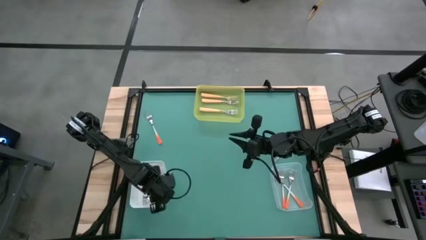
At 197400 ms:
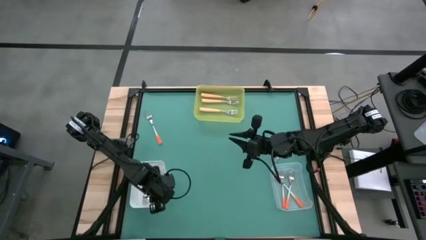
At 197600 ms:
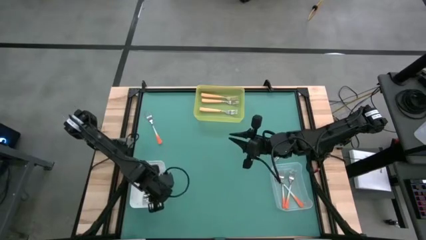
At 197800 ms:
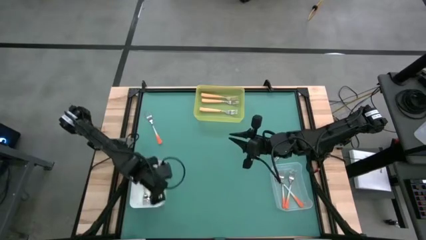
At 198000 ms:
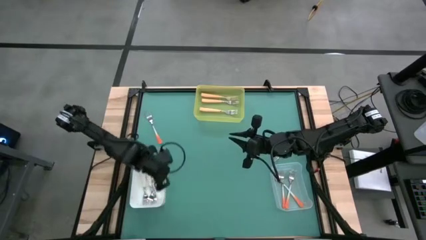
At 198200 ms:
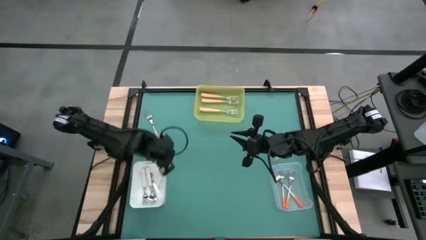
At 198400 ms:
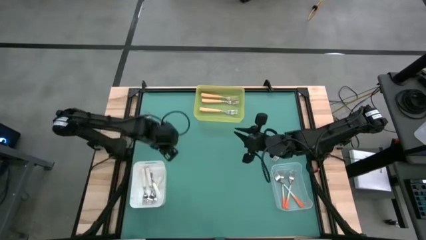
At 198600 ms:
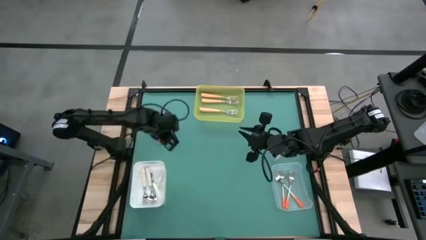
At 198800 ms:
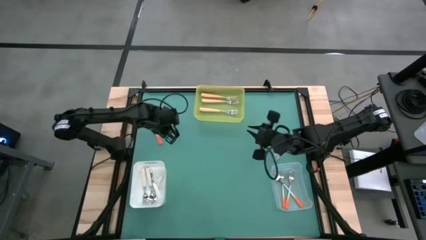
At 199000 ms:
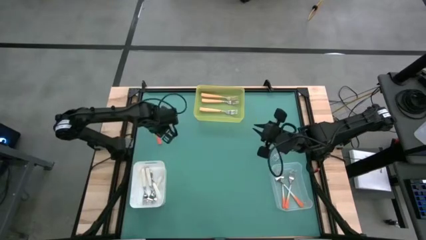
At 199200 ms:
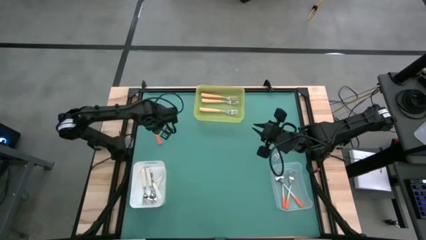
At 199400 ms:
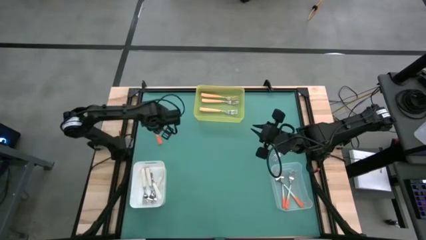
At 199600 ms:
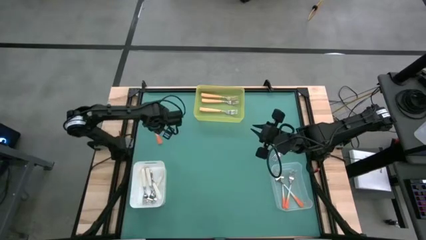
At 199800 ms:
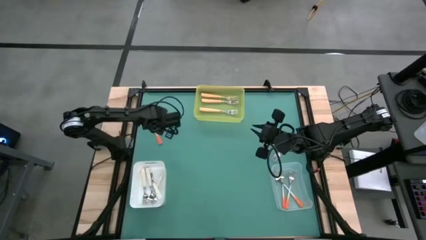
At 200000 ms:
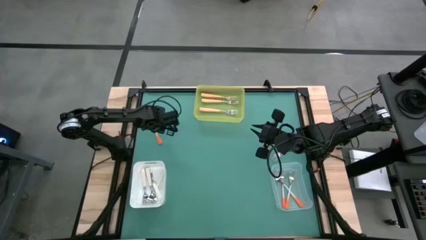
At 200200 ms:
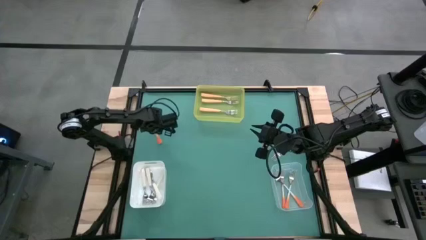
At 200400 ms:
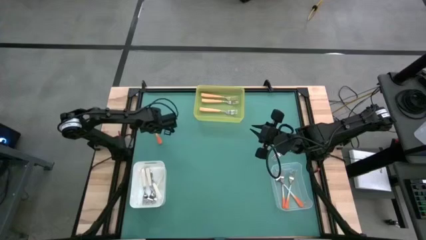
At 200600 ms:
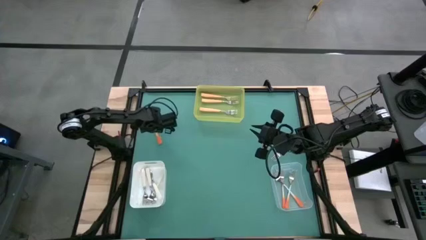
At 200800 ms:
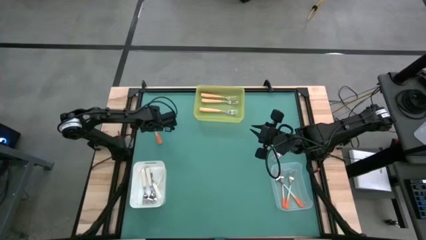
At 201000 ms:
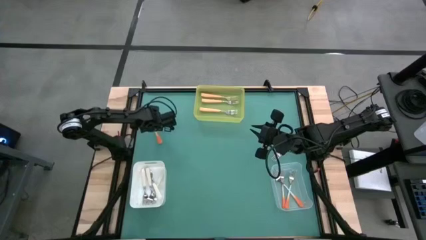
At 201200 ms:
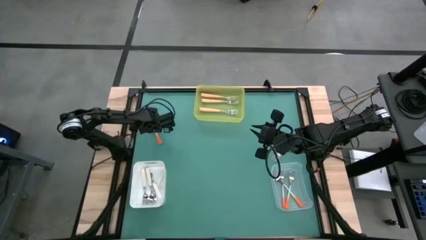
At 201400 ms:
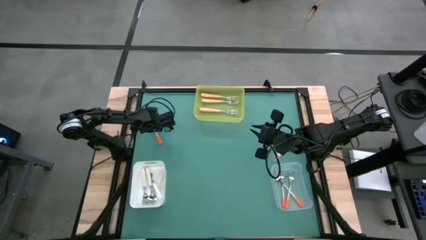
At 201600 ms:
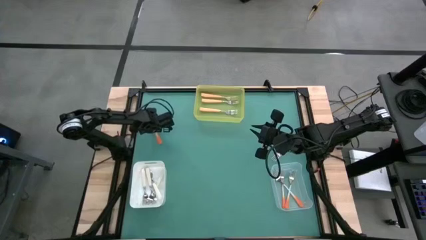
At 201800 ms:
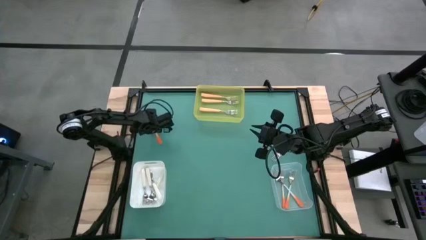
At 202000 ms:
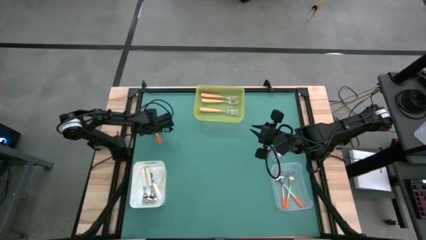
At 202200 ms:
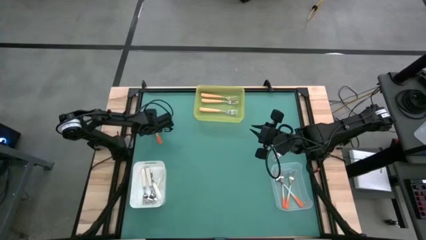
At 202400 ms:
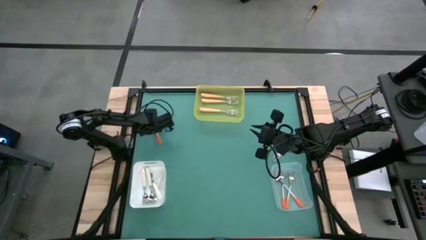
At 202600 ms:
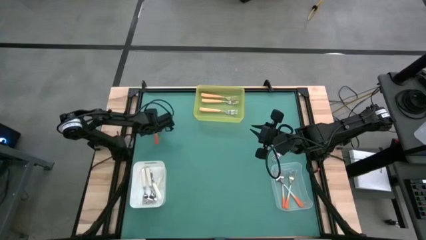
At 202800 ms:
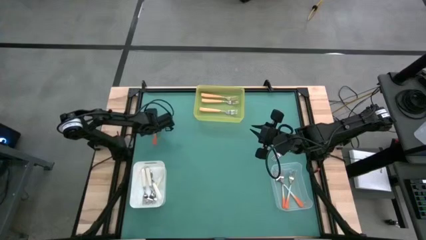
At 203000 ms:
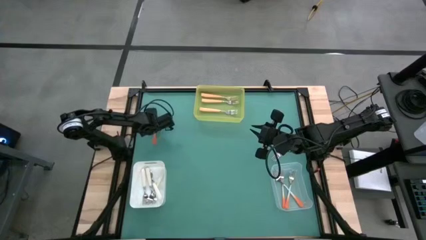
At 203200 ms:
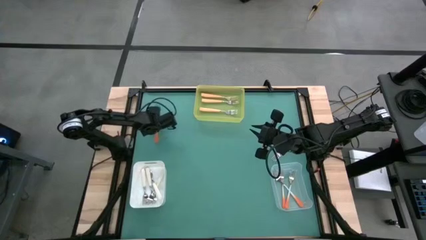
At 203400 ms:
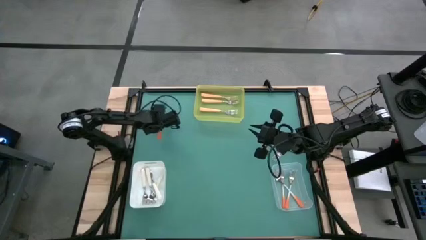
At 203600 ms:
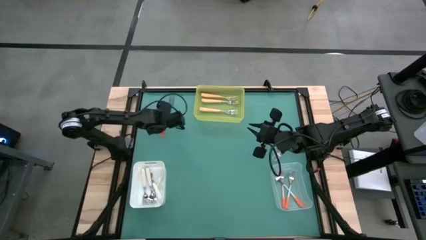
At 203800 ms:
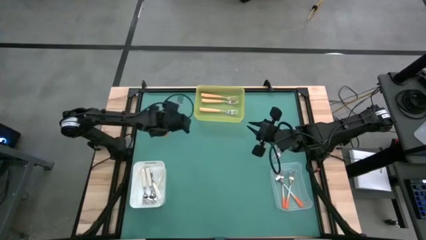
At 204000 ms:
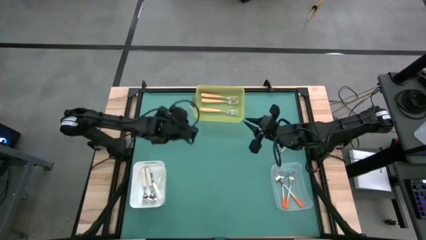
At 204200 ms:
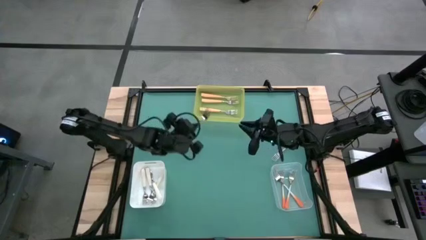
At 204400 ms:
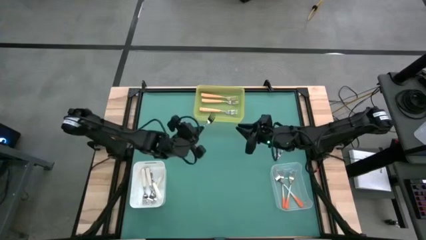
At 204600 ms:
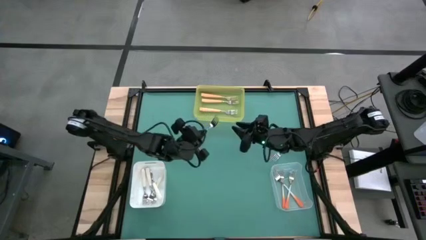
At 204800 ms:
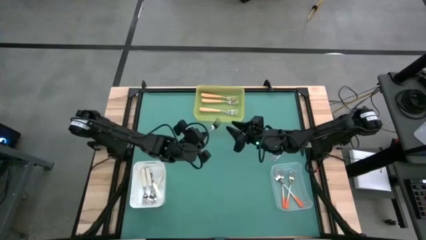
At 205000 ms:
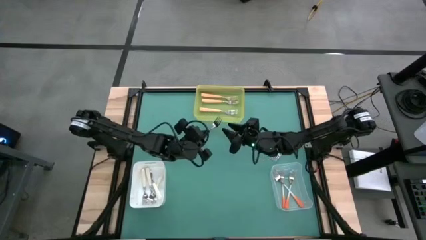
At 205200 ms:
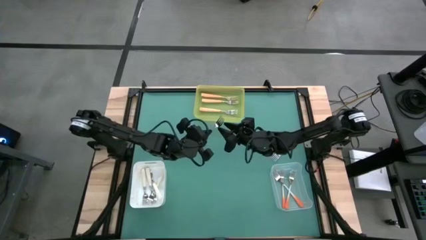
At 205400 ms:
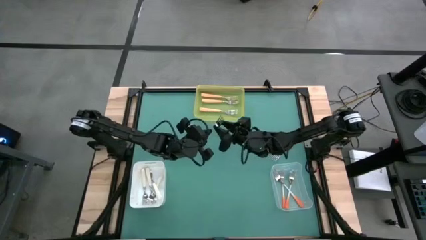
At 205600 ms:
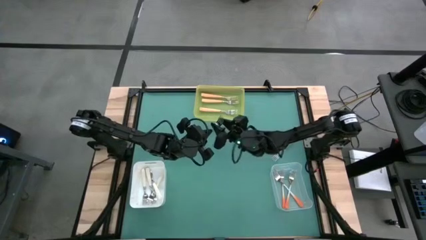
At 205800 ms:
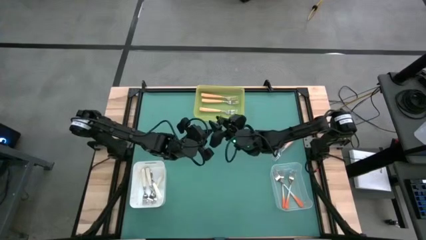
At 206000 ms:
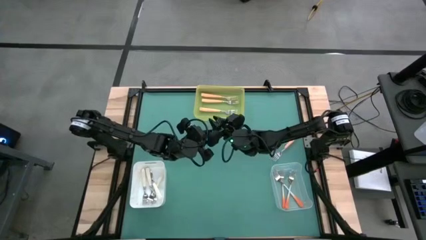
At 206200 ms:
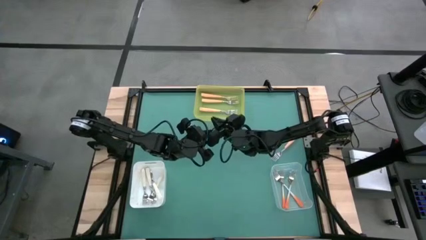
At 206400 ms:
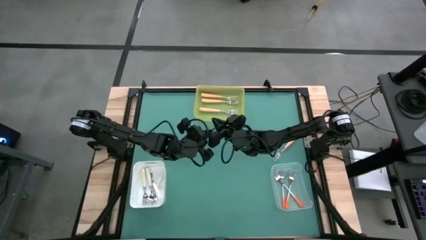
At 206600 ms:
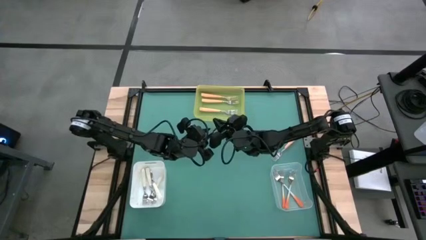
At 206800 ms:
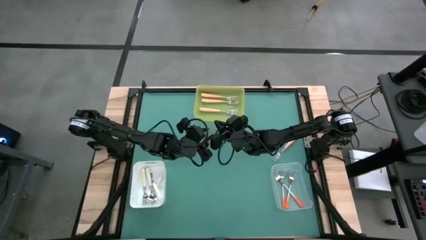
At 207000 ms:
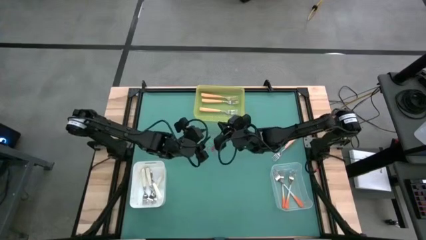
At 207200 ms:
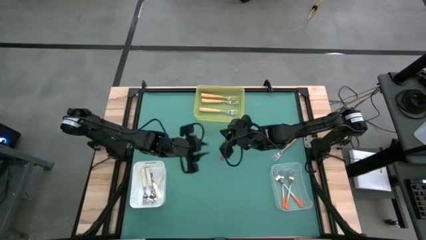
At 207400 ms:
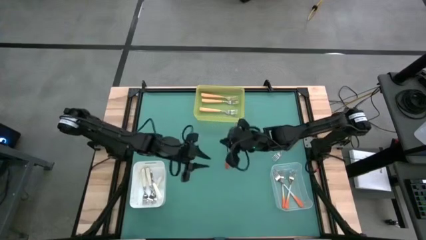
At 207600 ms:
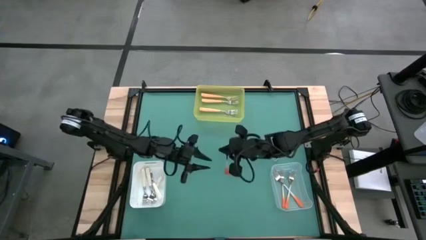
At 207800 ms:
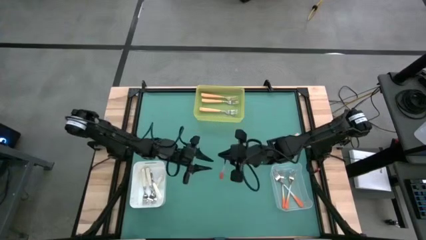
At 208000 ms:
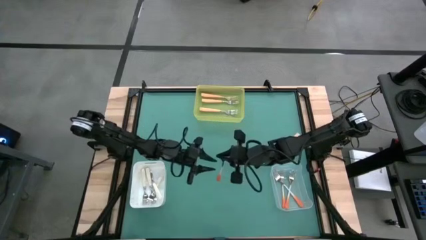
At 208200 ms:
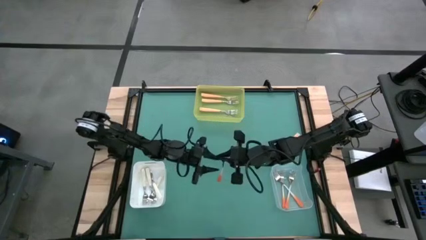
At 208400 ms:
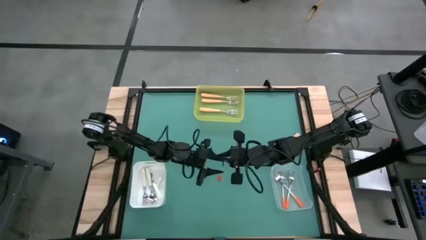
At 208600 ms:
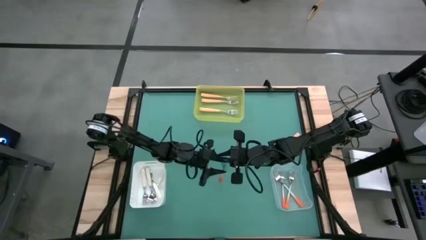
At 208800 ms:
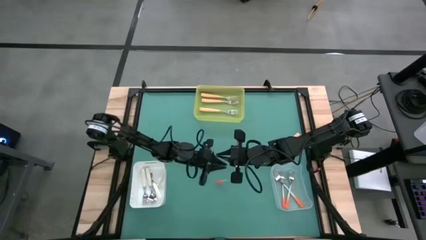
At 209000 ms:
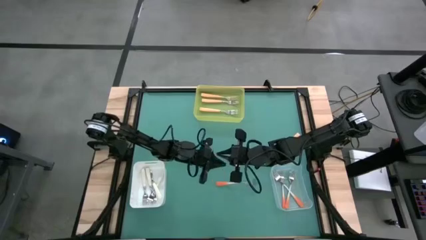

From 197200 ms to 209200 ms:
Task: Sort silverware by color (type)
Put the orange fork into the transparent bin
